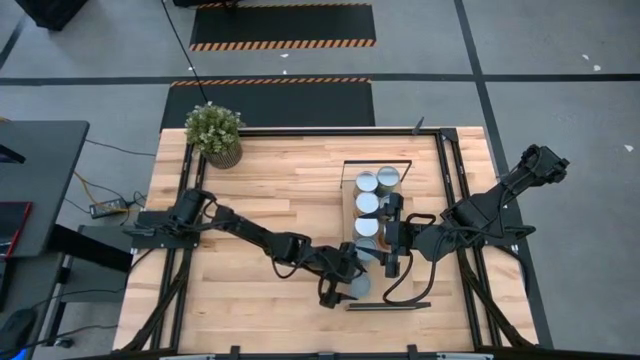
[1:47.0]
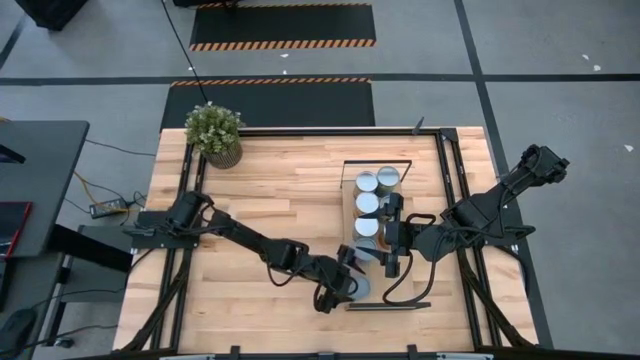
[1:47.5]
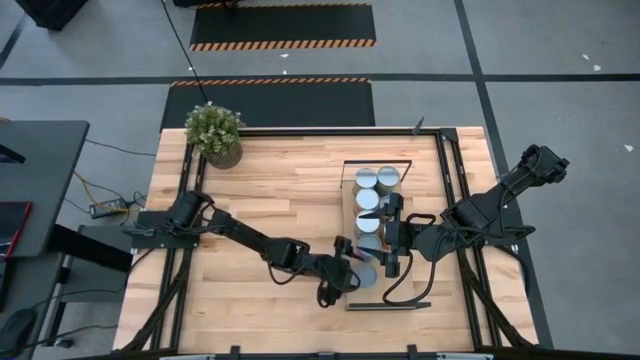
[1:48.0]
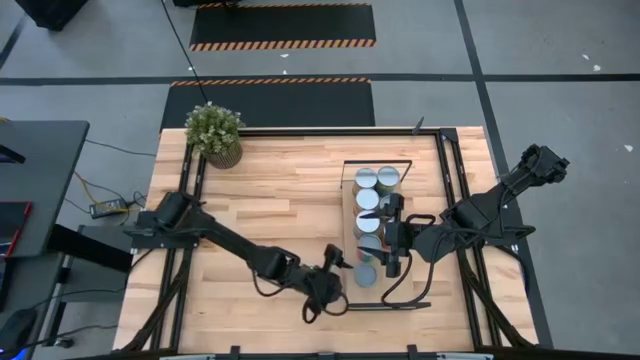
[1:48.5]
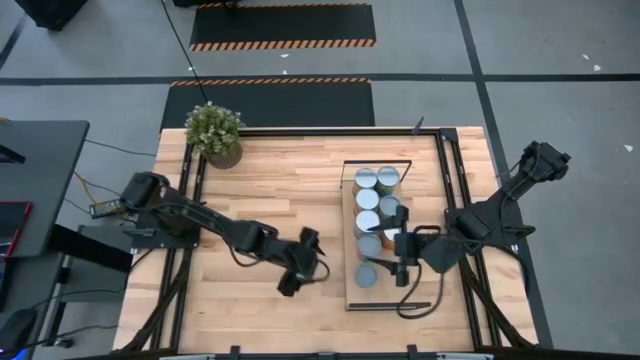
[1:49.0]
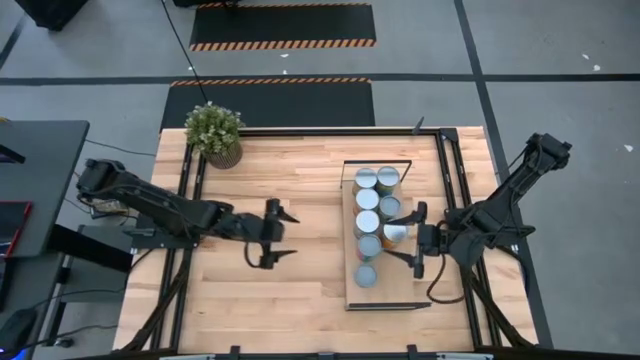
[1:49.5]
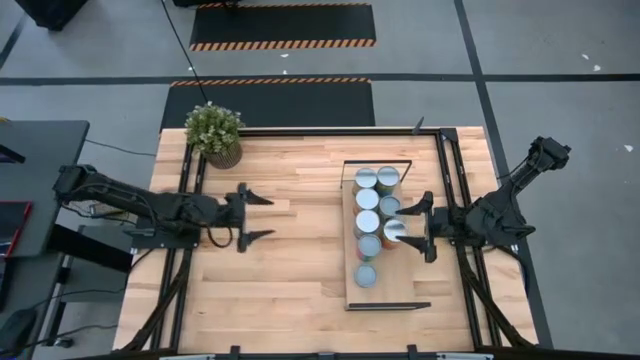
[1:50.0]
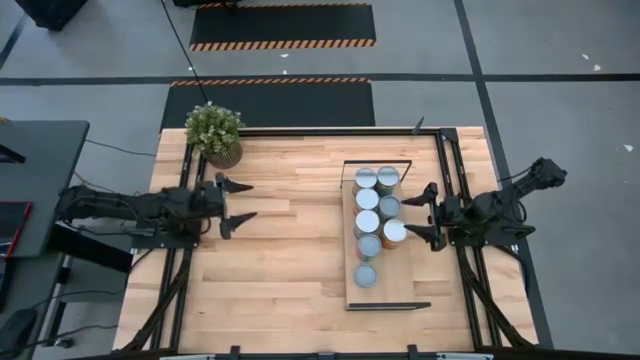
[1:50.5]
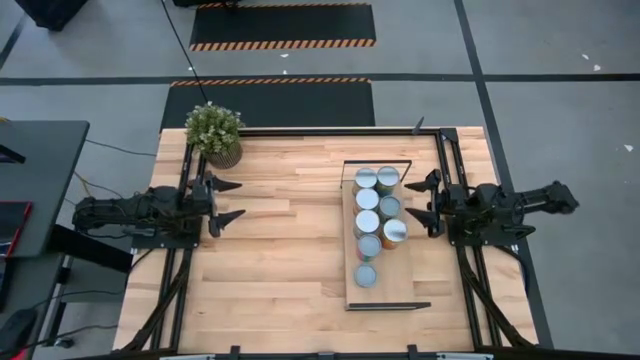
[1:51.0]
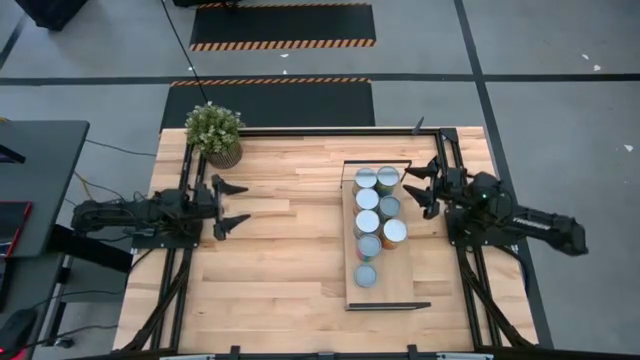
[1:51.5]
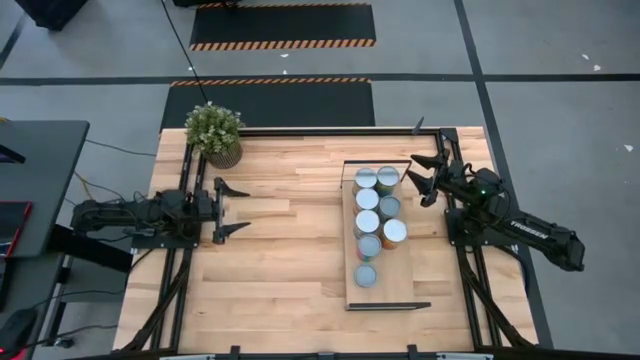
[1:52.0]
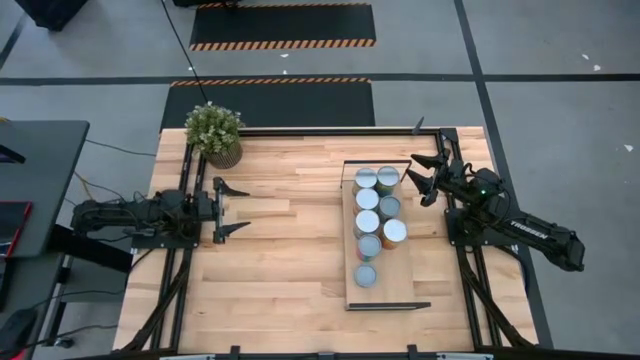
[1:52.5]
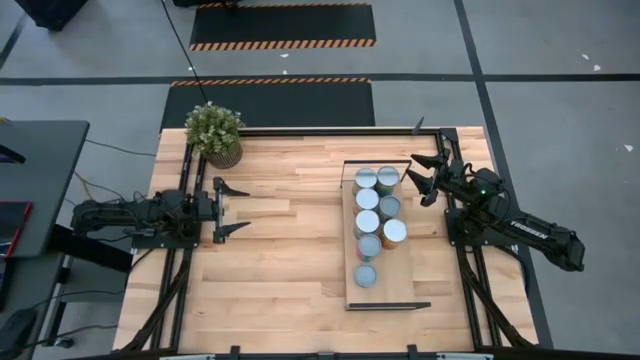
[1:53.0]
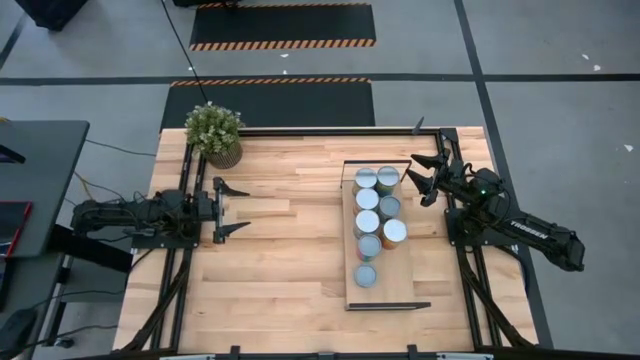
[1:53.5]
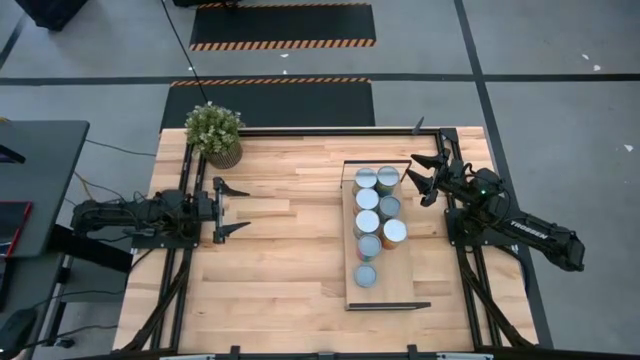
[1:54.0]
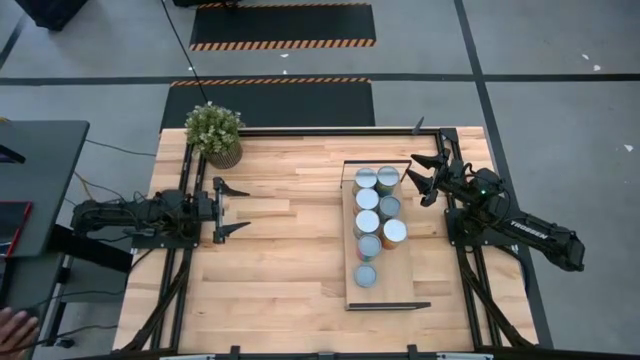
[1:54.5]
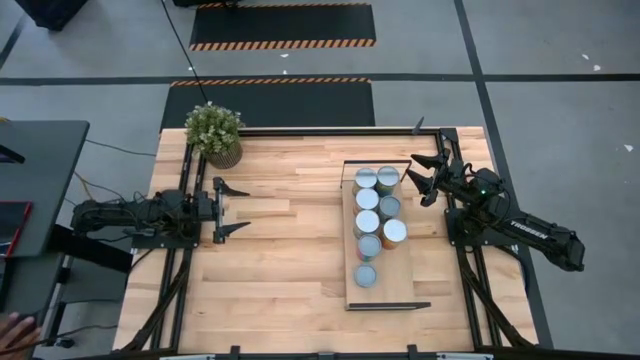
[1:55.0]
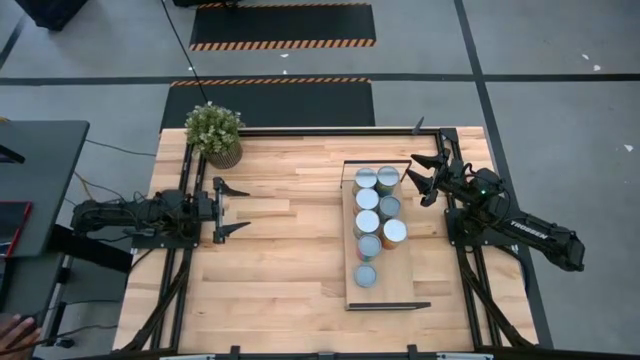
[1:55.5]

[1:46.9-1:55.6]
Task: Pick and place cans onto a shelf
Return to Home Position

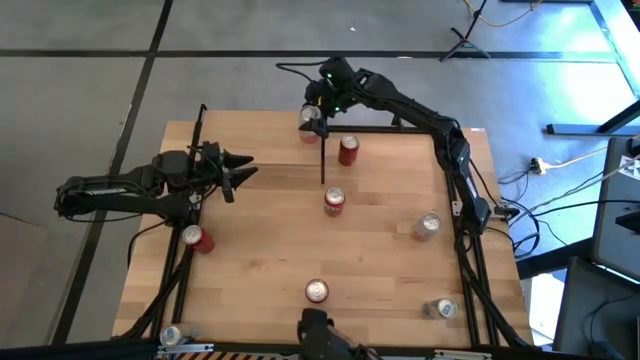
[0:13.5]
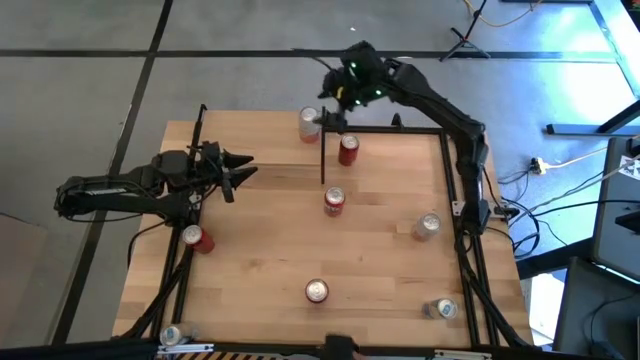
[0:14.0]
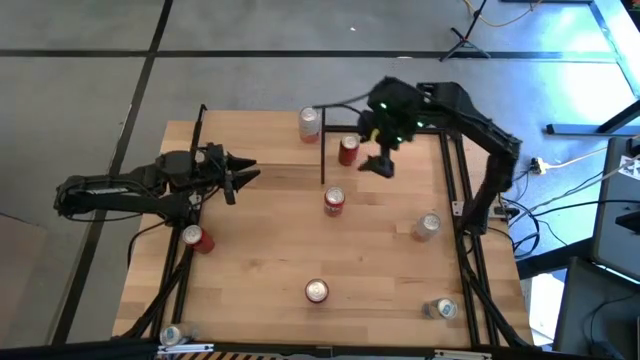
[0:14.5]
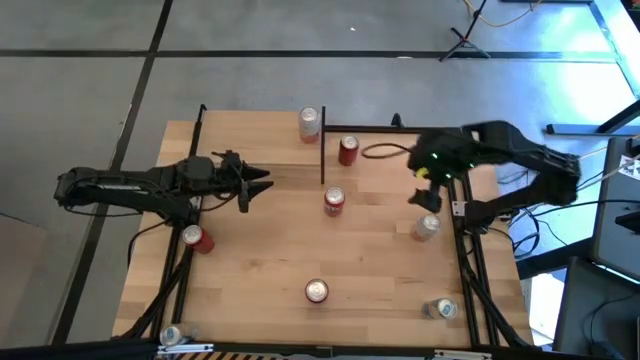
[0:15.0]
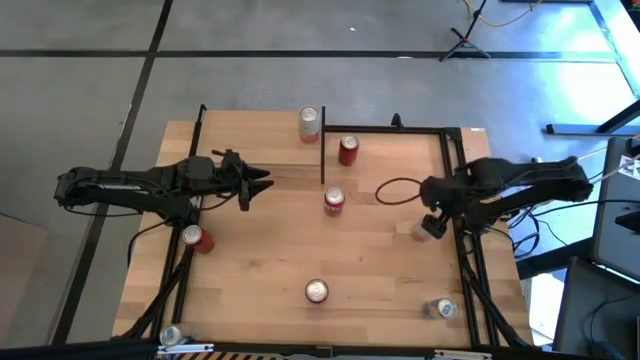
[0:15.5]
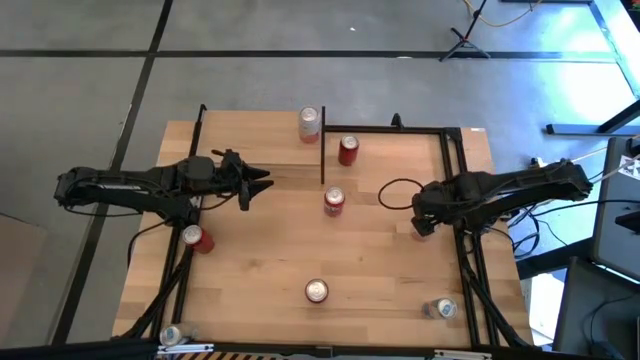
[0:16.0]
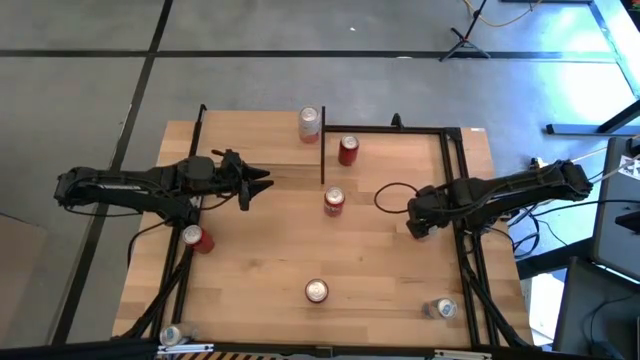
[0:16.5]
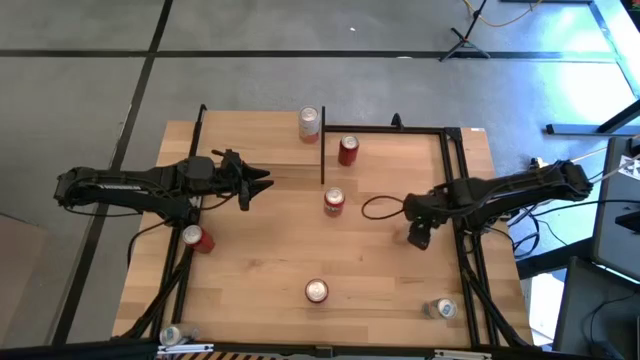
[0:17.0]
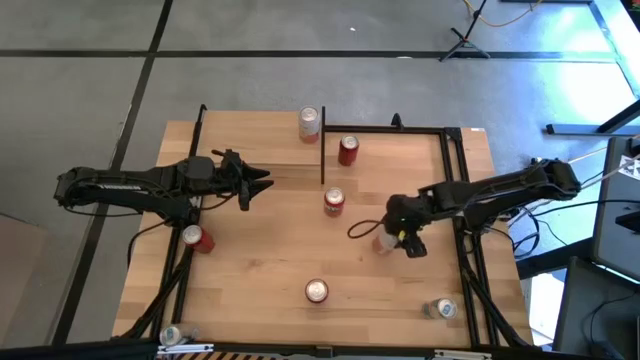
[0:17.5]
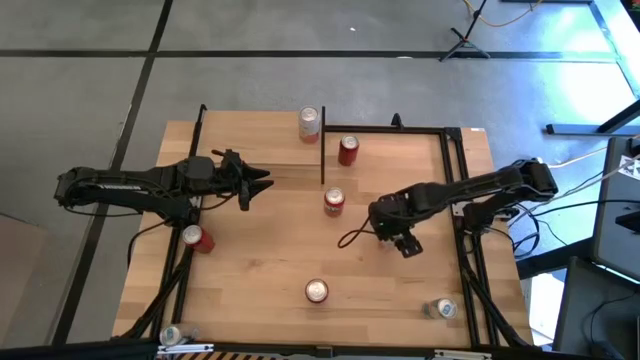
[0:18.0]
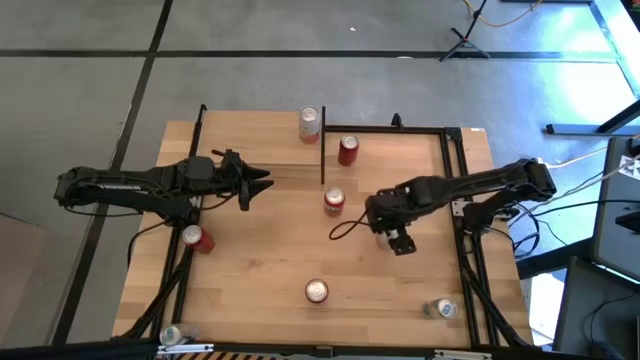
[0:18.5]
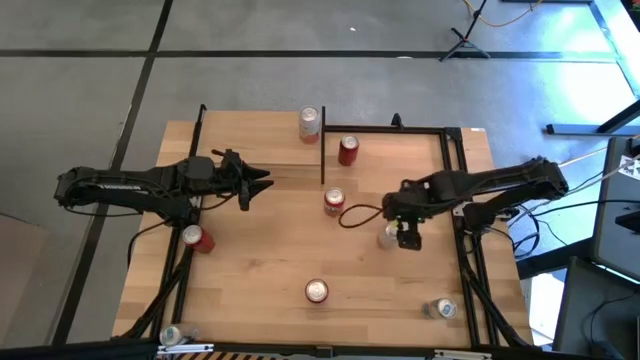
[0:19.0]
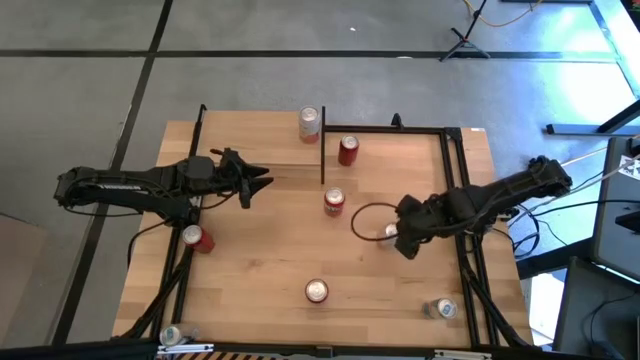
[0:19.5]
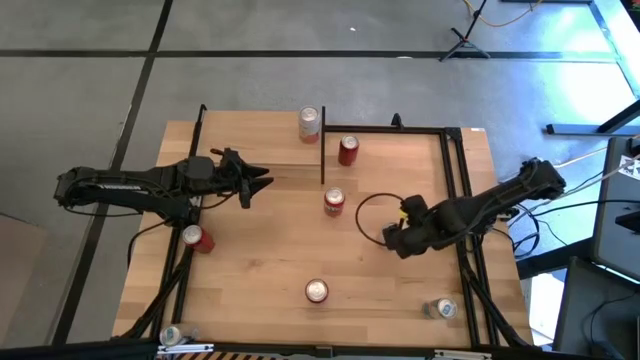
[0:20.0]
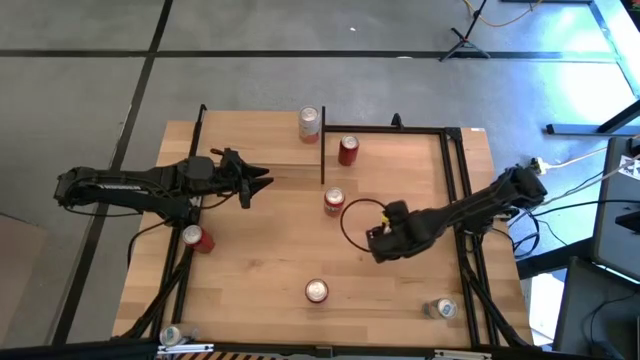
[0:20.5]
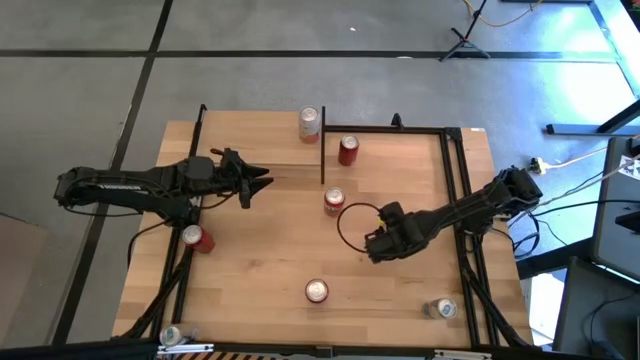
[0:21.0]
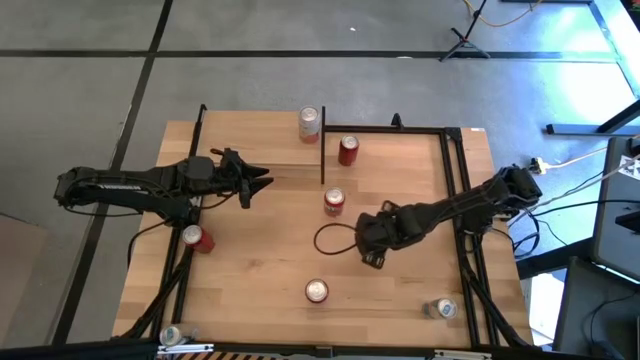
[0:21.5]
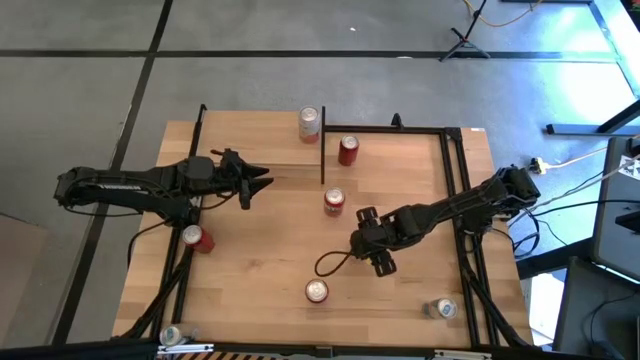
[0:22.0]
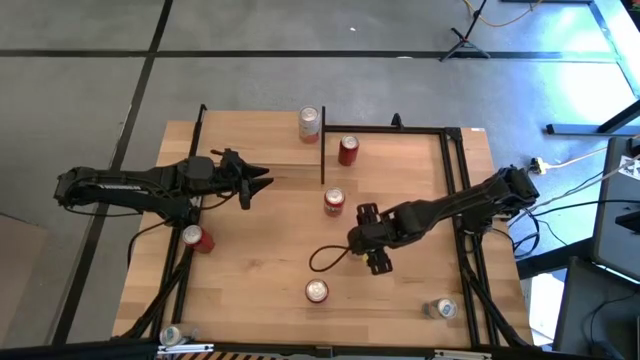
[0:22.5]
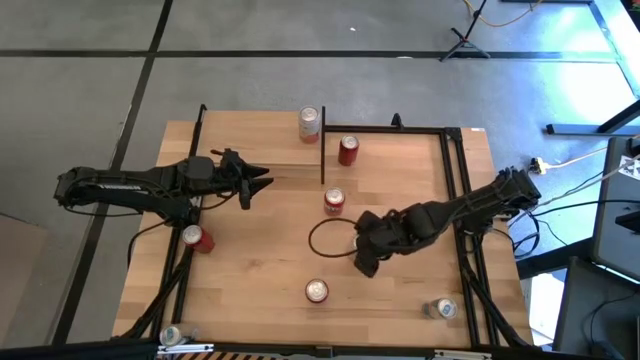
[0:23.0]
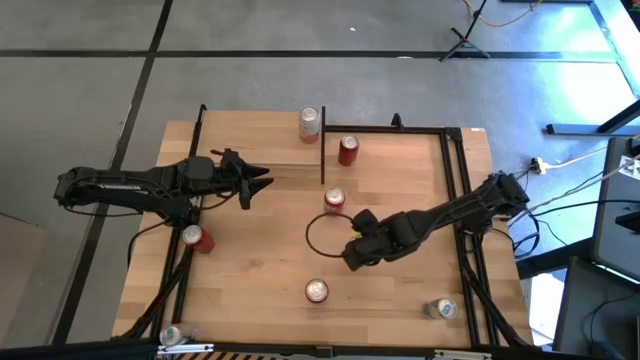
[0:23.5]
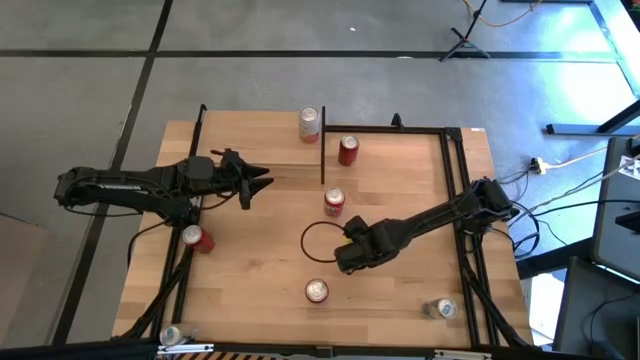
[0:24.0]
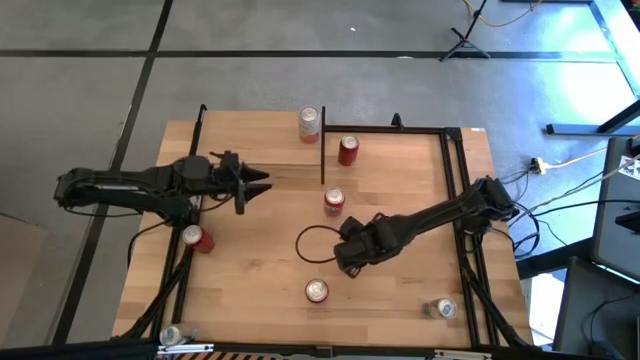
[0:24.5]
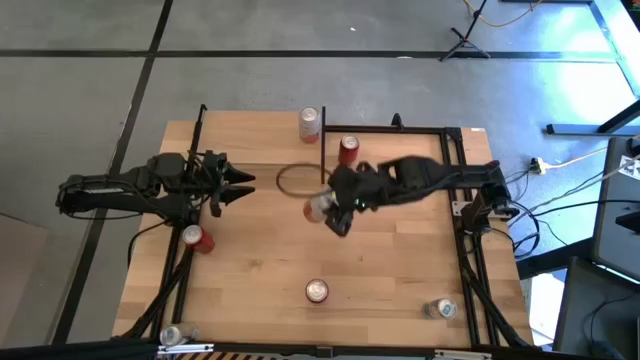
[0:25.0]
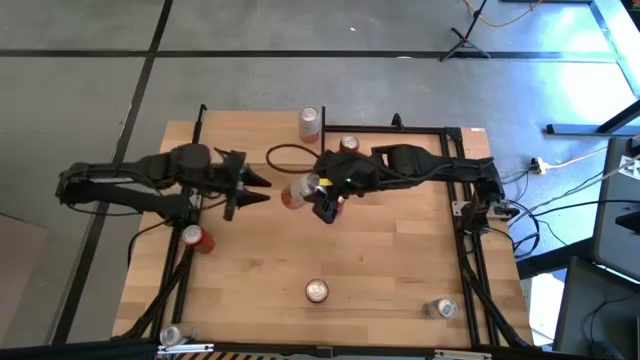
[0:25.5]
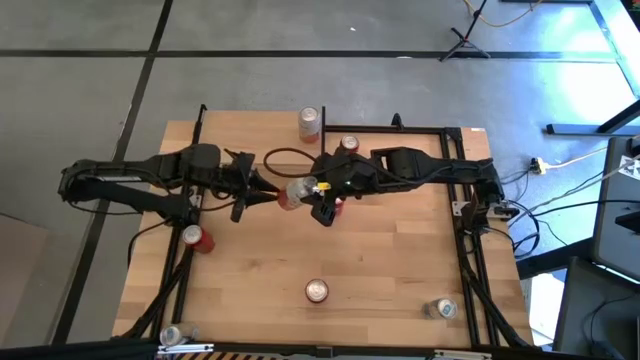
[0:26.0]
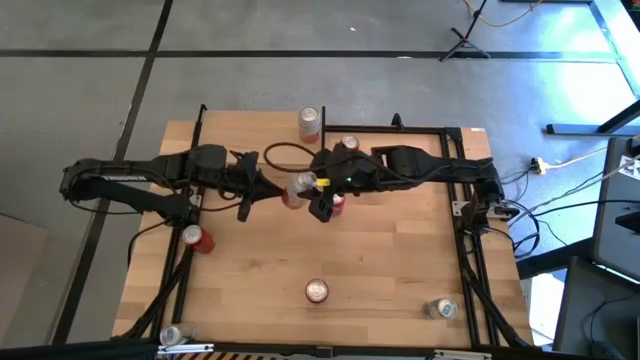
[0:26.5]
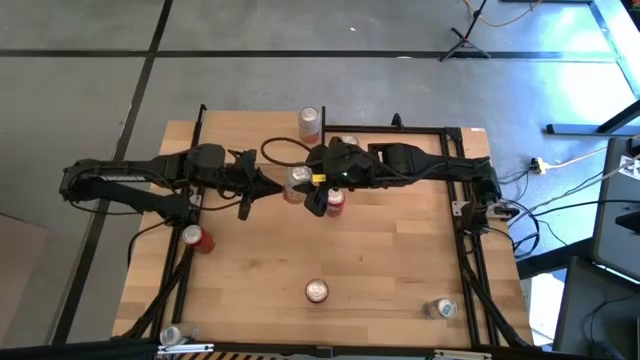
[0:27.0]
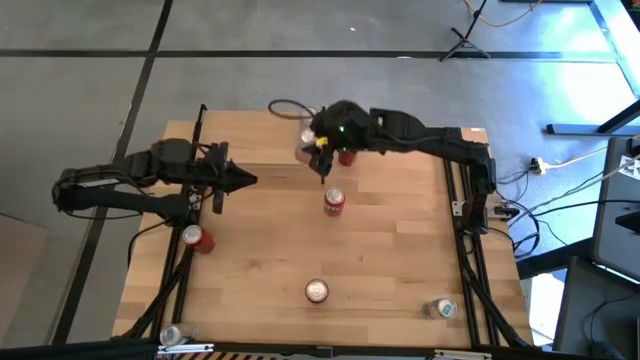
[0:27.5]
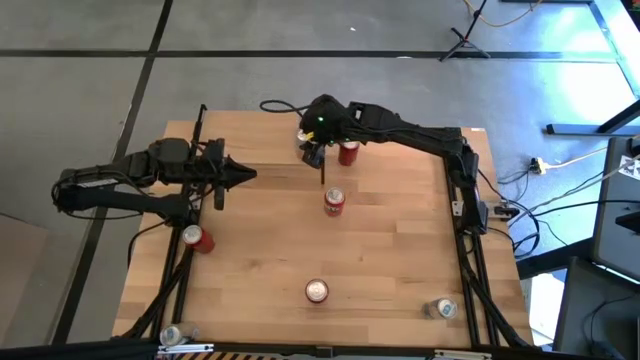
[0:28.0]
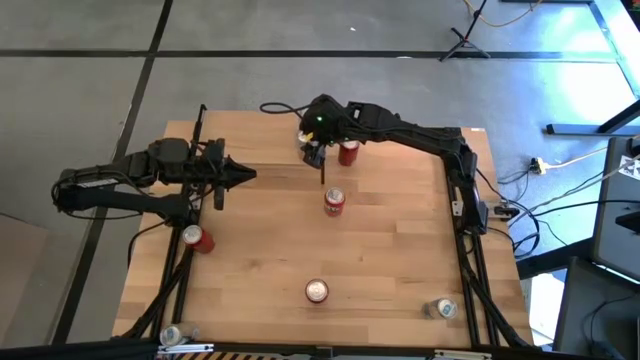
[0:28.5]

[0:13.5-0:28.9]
Task: Place canned beverage on shelf
Put the white soda can on the shelf aligned with the other white soda can
